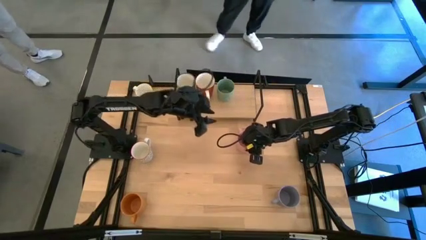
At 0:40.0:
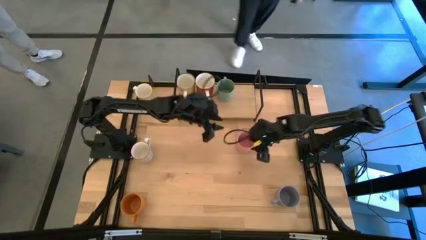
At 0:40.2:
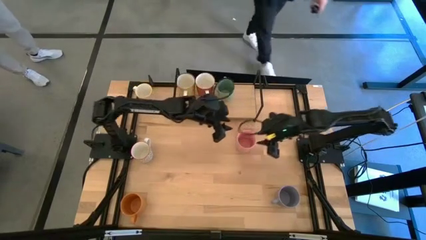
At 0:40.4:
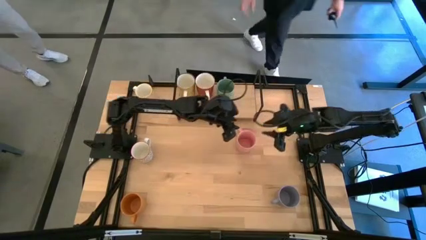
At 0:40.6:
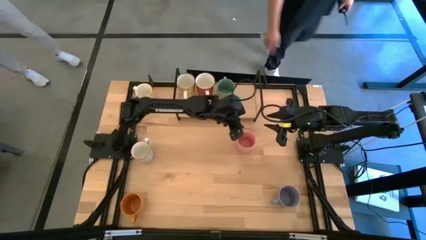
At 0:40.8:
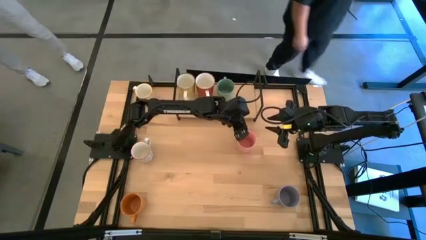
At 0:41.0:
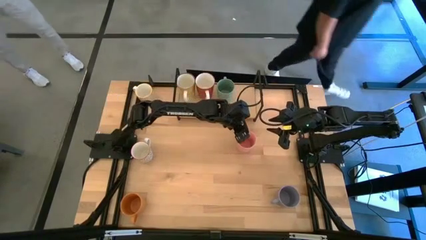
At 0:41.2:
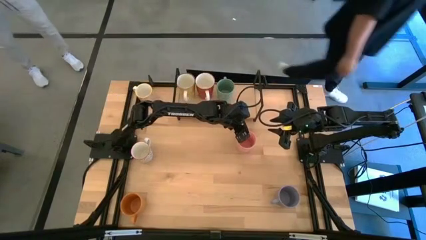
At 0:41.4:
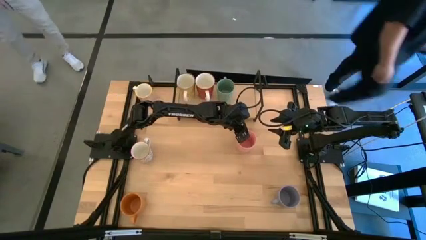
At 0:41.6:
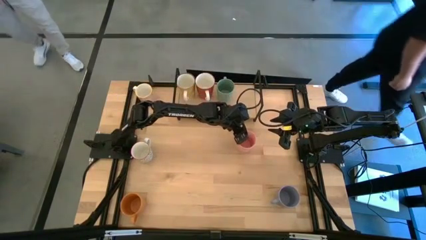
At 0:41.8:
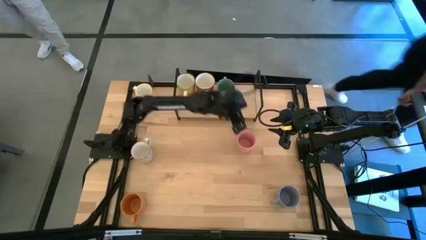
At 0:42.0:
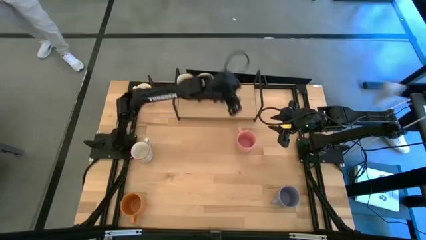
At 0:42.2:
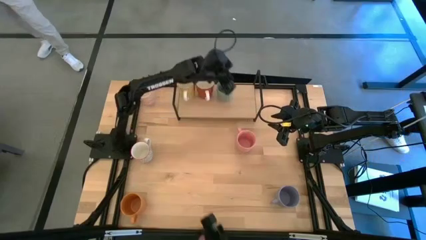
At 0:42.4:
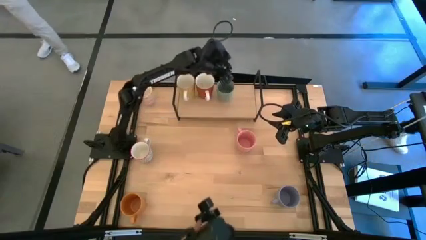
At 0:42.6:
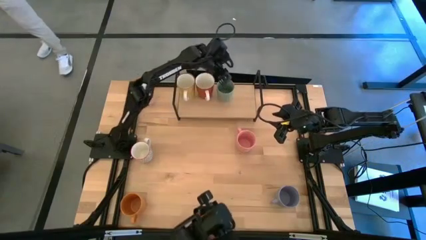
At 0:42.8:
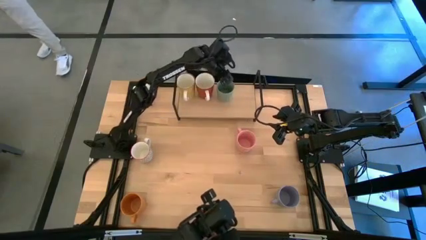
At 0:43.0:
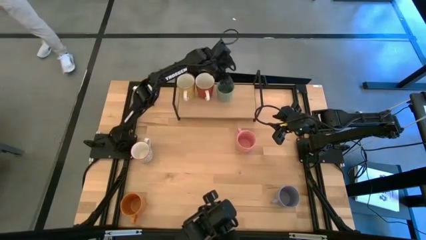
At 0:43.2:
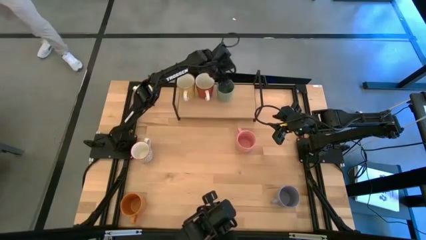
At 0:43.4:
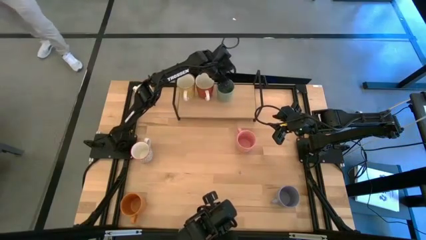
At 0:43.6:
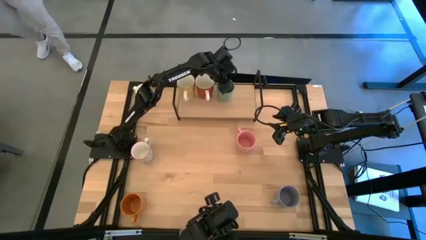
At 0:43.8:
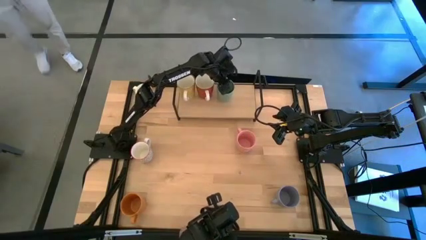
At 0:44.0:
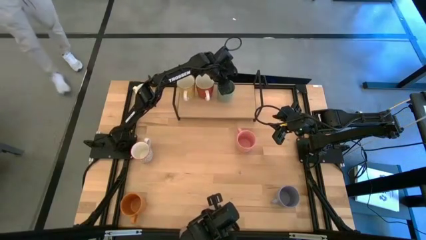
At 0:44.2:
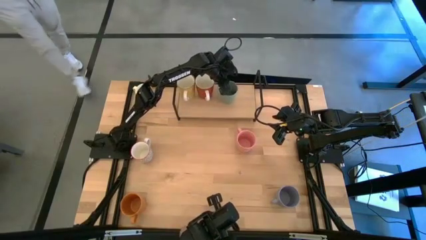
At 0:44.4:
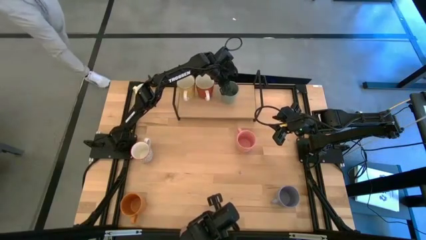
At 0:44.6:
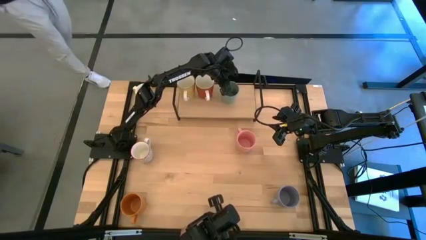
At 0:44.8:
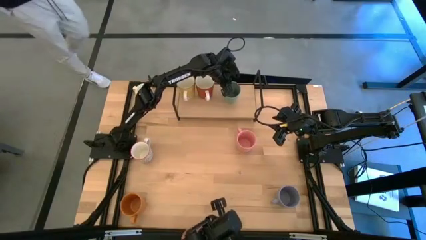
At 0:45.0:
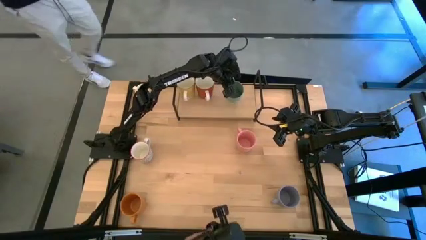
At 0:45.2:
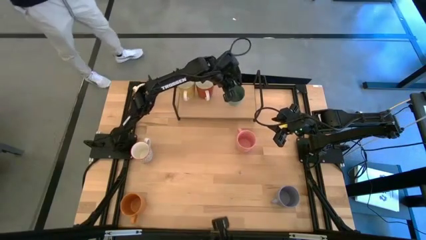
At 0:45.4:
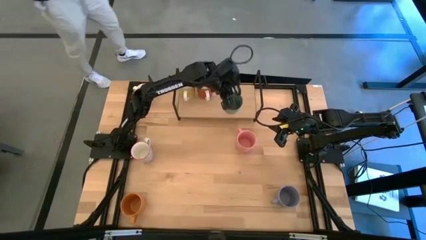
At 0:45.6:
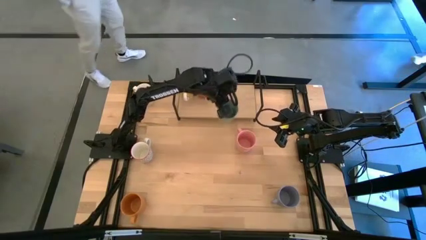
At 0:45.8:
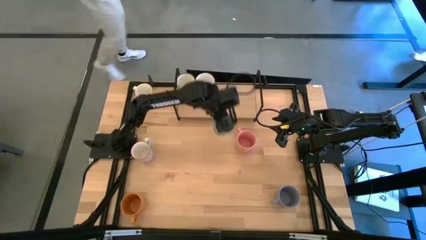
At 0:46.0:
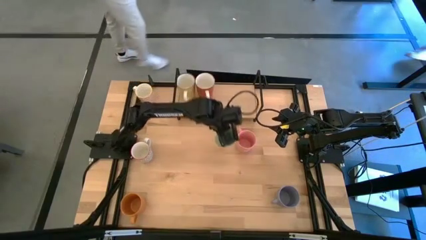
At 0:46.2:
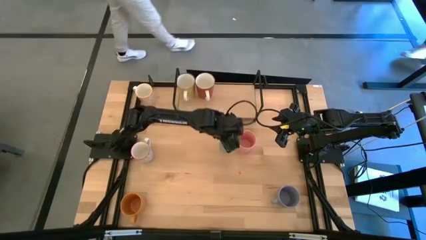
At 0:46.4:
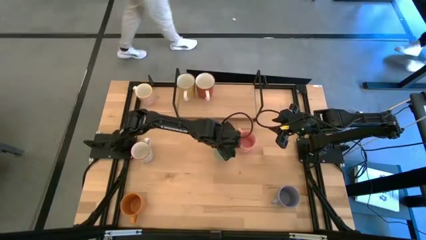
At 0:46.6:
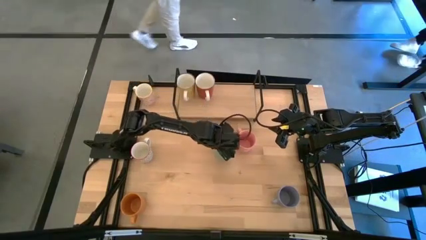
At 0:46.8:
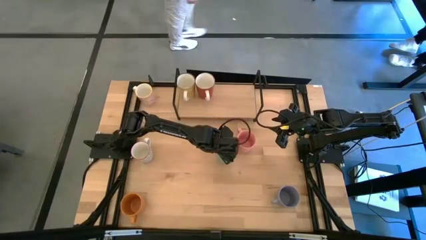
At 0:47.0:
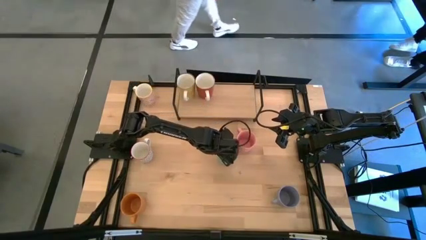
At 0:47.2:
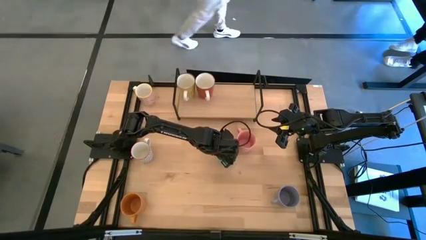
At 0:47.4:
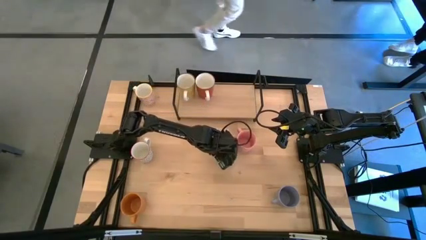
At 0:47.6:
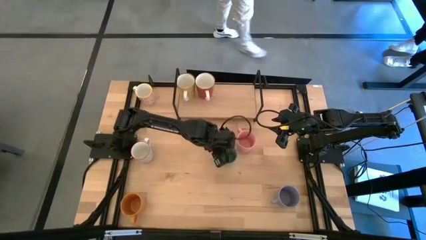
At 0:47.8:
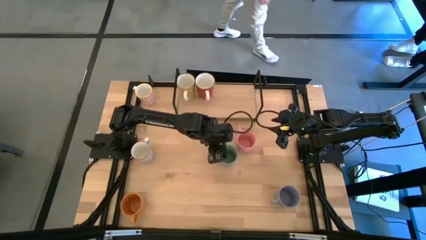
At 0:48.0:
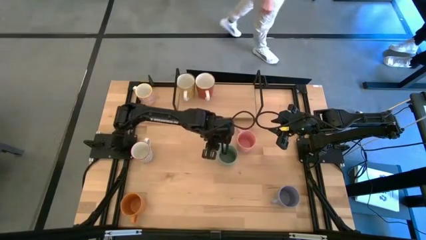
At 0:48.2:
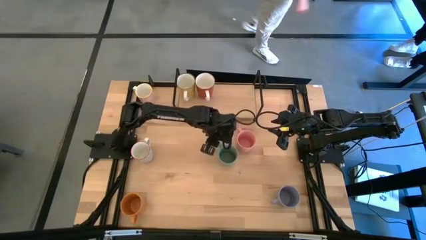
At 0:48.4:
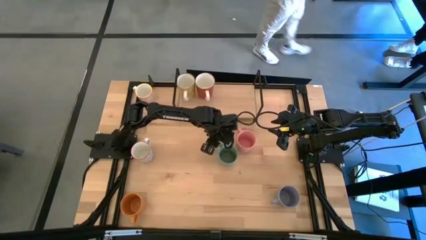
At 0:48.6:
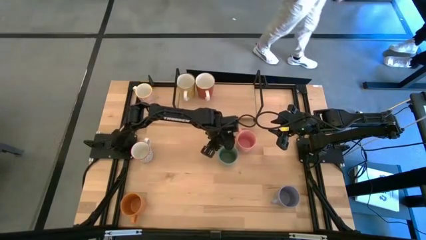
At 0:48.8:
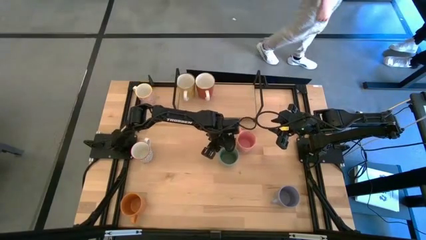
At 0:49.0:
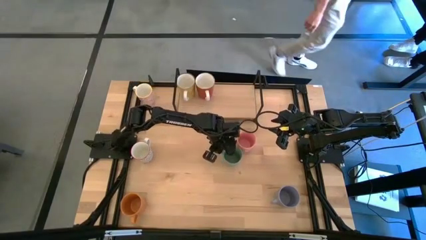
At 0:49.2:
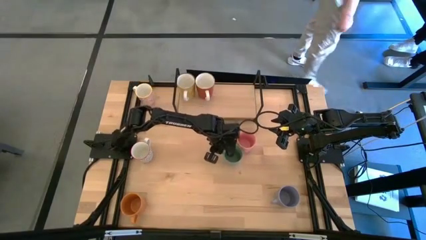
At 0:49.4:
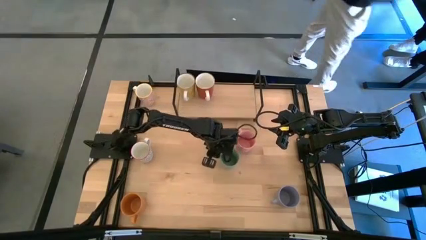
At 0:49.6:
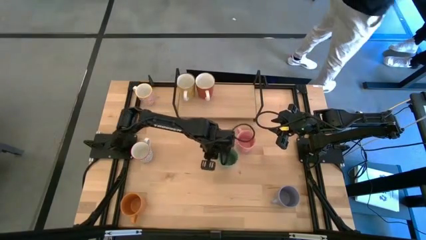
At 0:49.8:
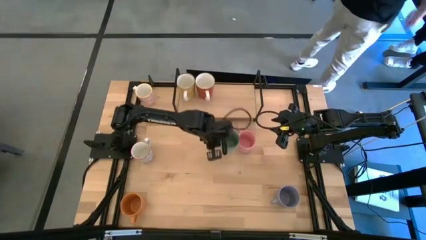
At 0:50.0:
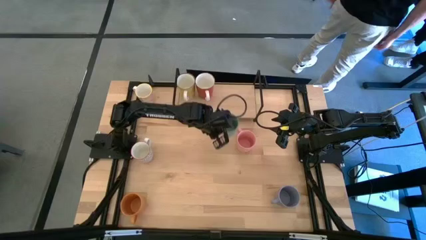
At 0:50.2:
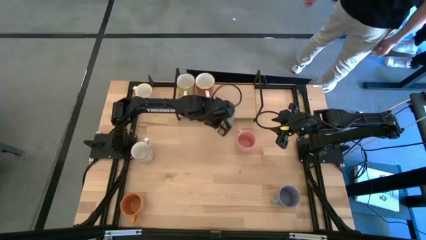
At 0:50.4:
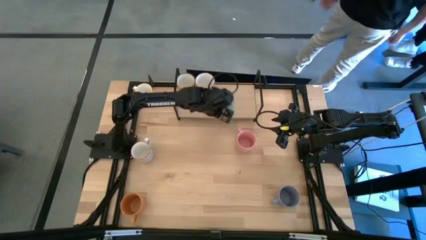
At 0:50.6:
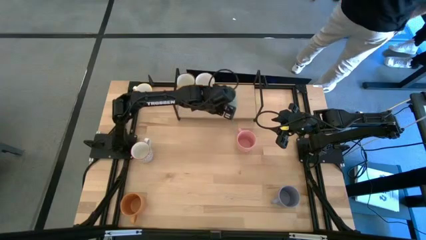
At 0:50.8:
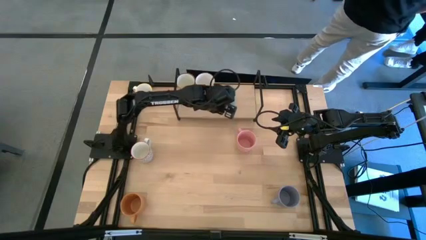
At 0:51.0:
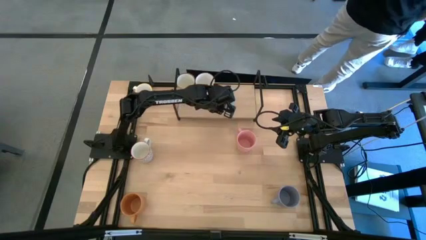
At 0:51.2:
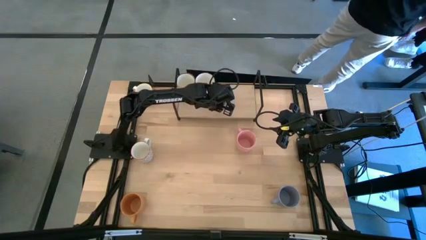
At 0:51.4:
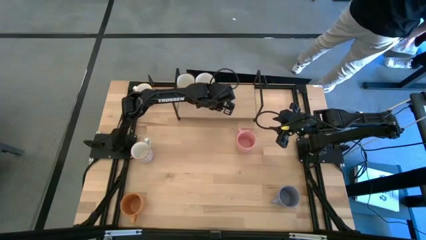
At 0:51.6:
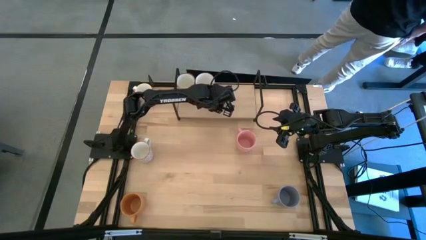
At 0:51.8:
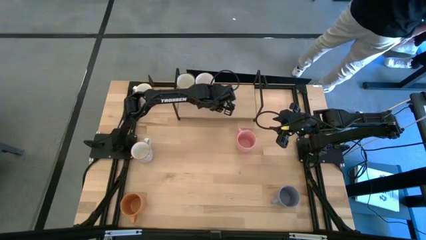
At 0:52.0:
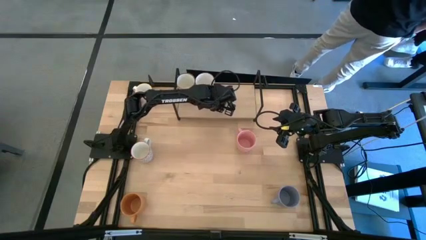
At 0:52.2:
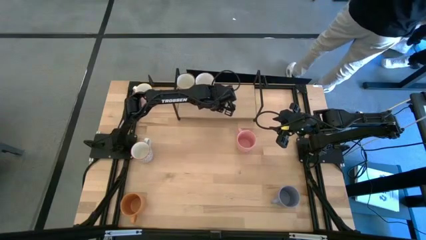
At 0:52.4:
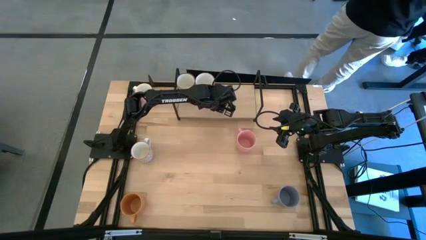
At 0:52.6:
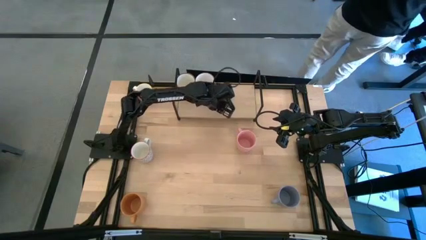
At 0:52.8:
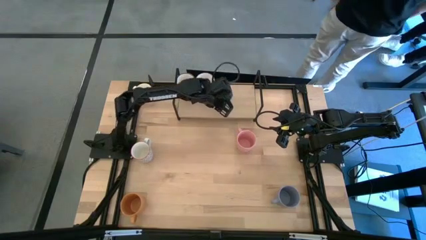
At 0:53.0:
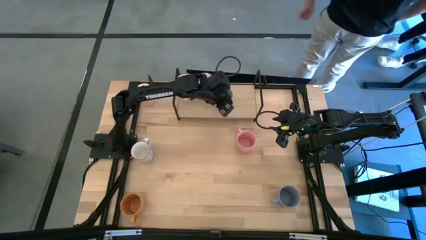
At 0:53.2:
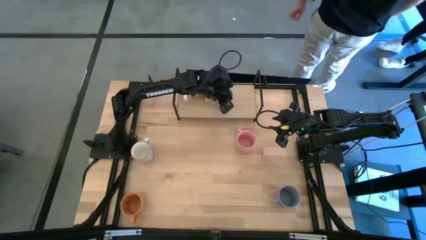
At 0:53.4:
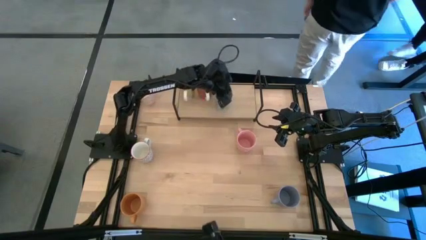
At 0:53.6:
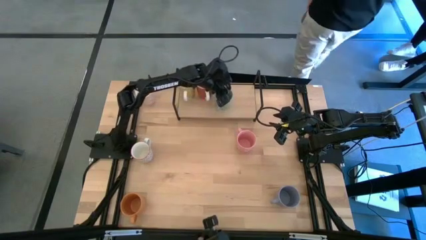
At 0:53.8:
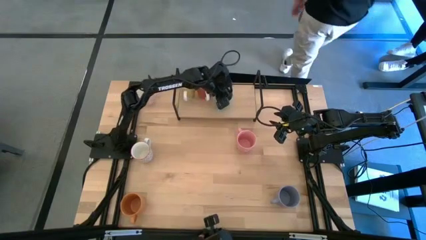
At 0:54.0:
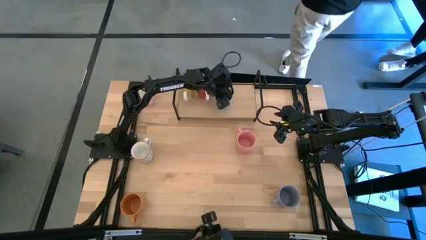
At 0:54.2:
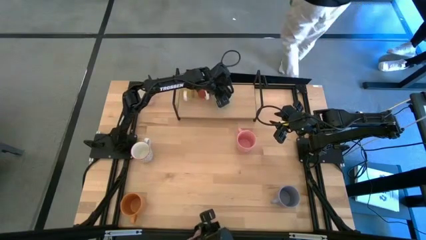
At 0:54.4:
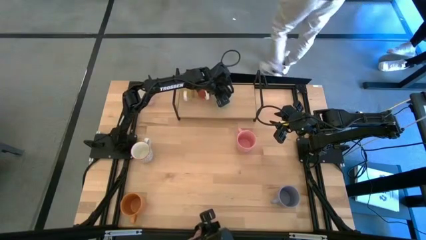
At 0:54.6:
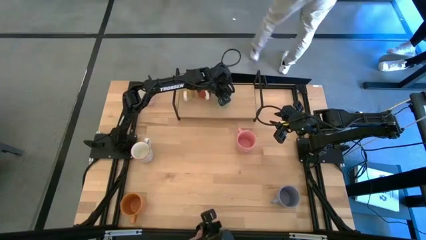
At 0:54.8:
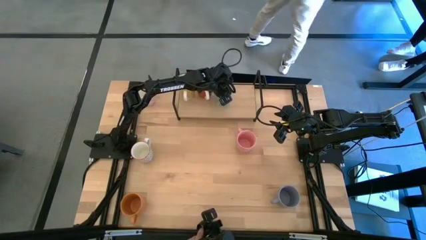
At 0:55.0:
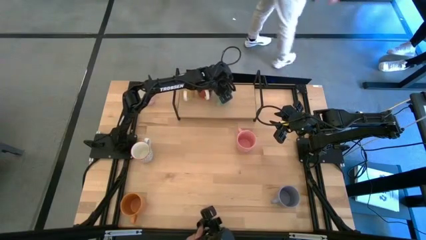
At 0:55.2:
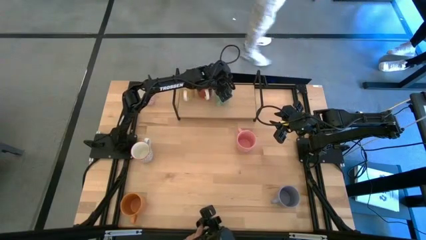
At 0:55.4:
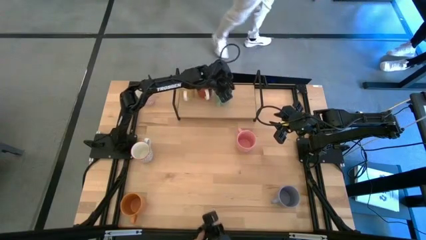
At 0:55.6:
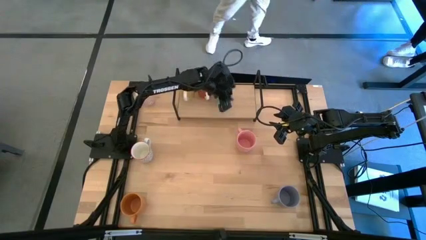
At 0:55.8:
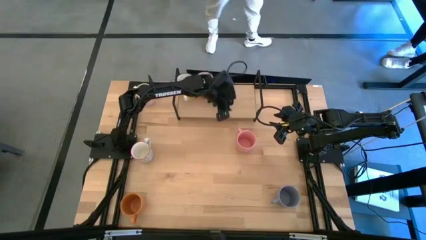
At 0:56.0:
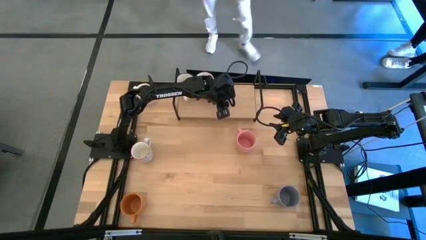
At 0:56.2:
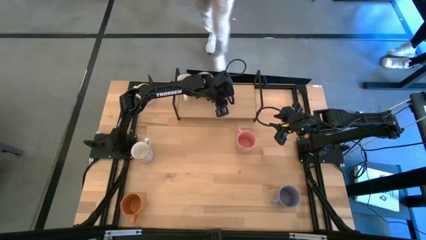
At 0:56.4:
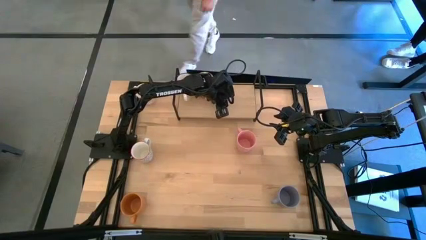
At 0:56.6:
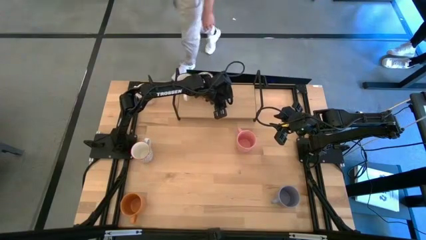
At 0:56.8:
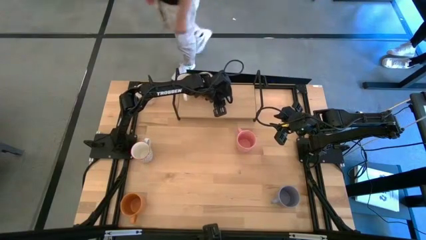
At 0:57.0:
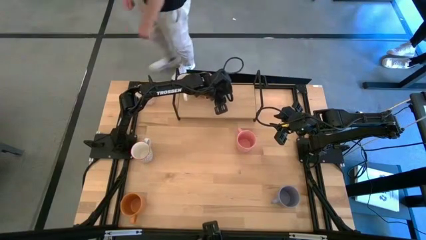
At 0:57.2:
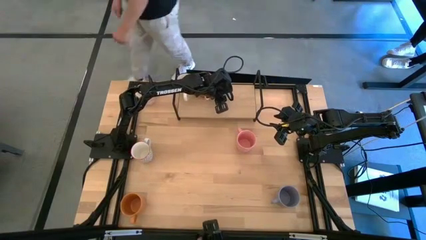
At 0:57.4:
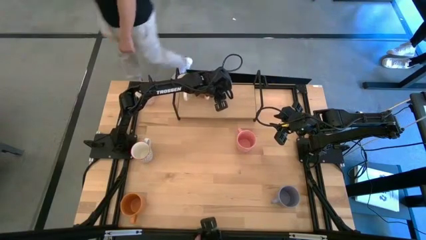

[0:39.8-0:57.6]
Task: Place coffee mugs
Adjust the green mug
